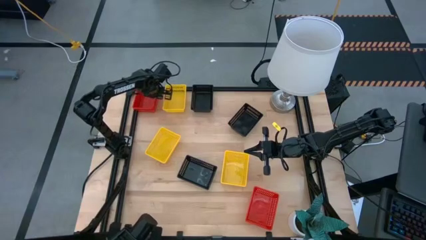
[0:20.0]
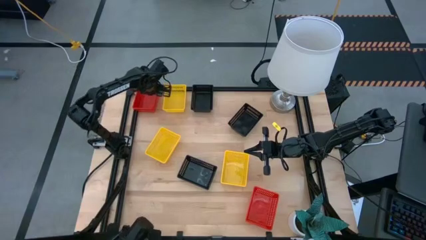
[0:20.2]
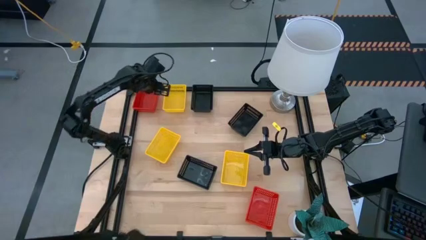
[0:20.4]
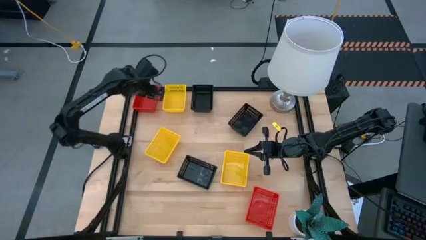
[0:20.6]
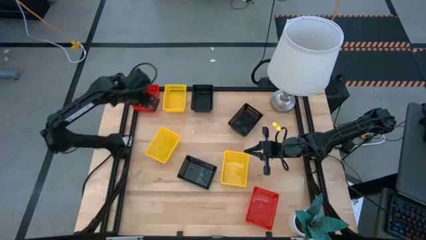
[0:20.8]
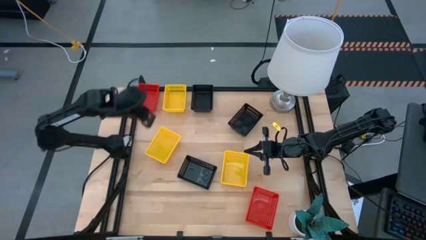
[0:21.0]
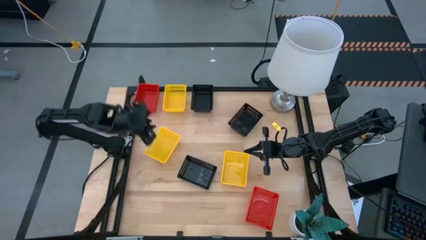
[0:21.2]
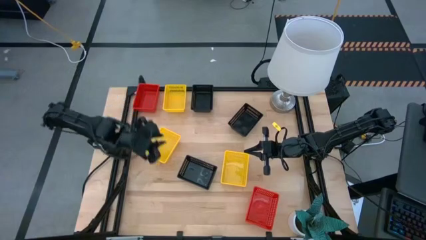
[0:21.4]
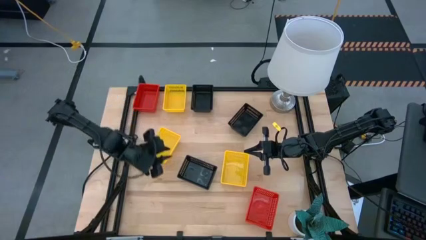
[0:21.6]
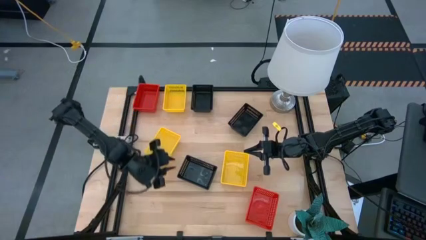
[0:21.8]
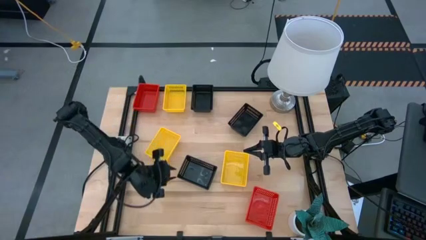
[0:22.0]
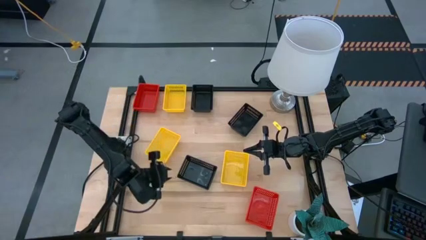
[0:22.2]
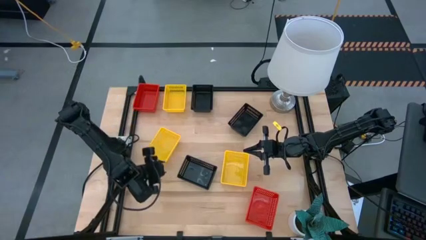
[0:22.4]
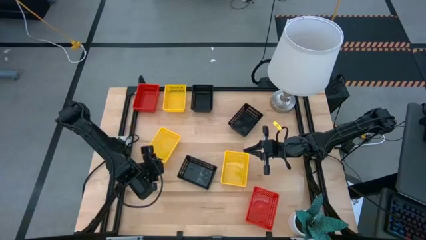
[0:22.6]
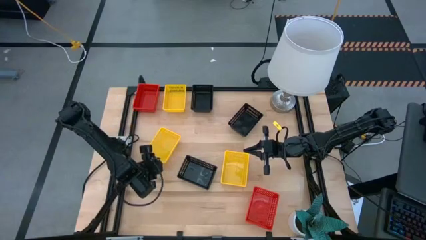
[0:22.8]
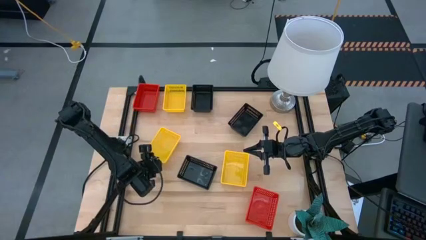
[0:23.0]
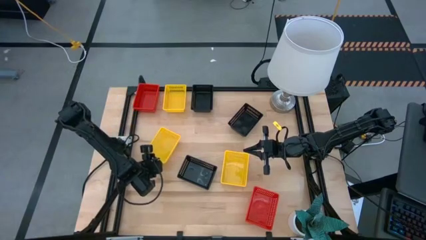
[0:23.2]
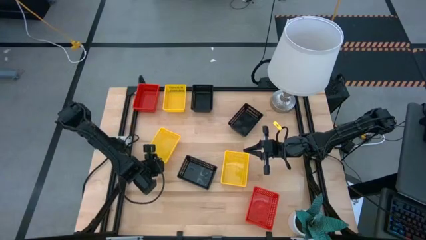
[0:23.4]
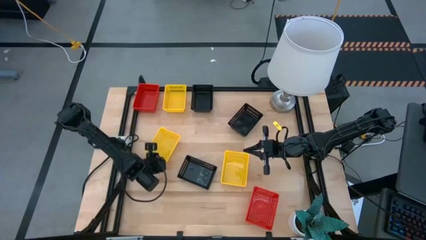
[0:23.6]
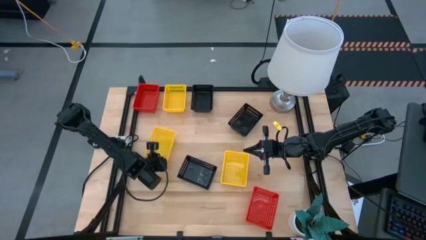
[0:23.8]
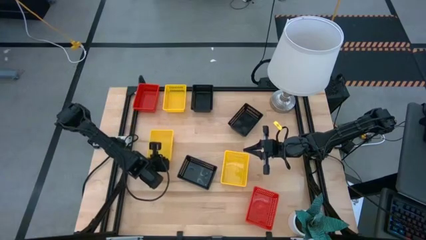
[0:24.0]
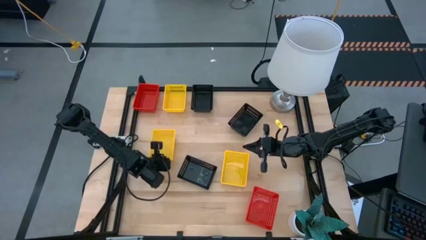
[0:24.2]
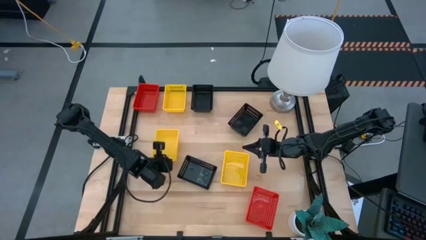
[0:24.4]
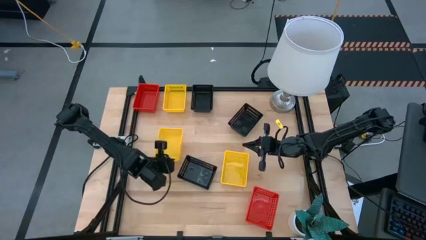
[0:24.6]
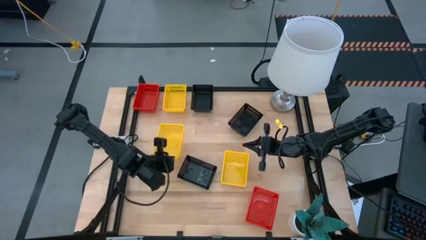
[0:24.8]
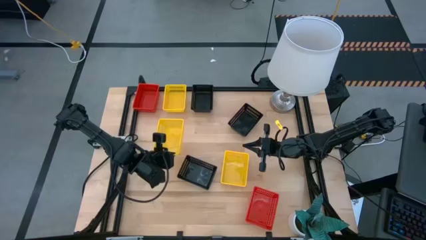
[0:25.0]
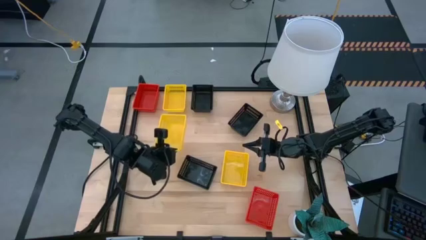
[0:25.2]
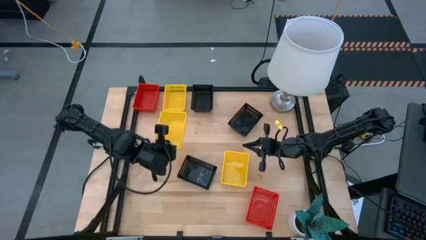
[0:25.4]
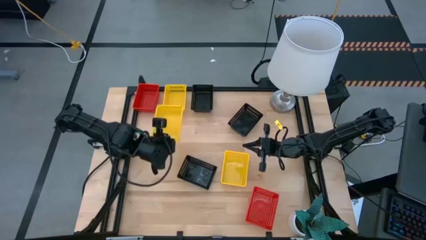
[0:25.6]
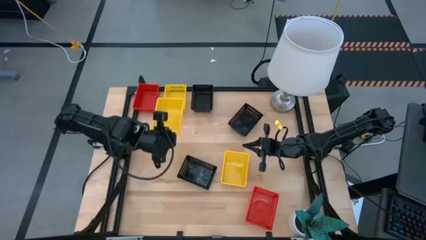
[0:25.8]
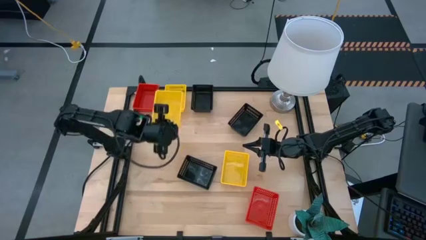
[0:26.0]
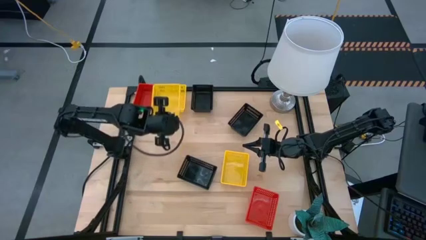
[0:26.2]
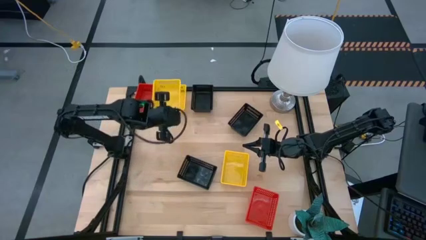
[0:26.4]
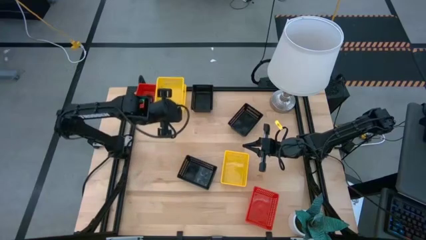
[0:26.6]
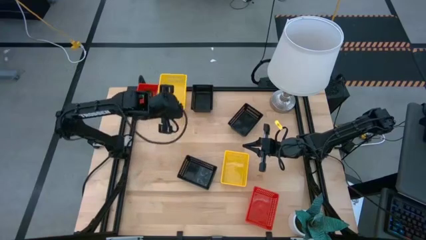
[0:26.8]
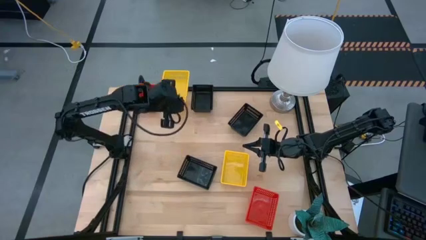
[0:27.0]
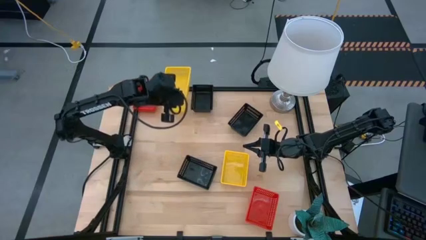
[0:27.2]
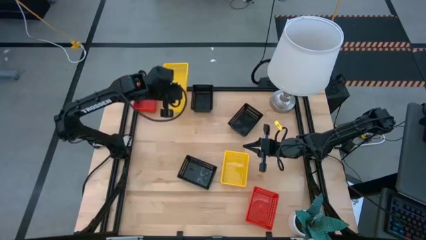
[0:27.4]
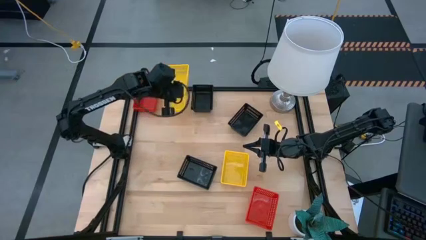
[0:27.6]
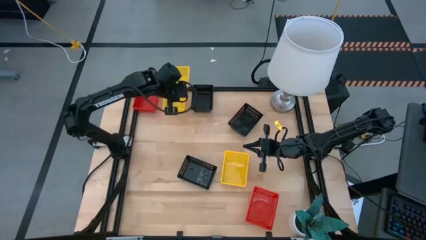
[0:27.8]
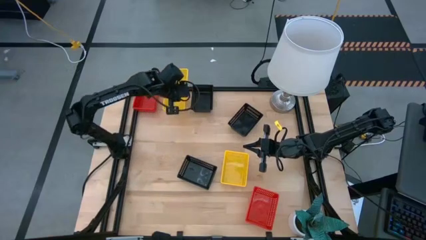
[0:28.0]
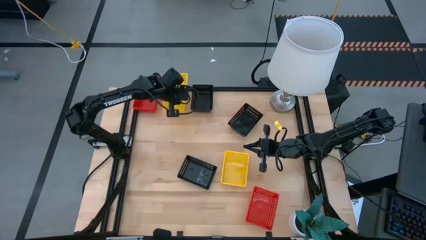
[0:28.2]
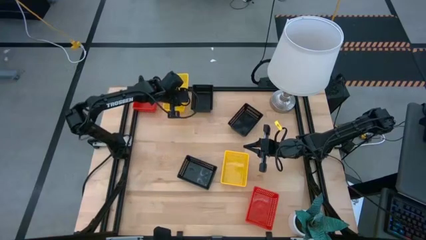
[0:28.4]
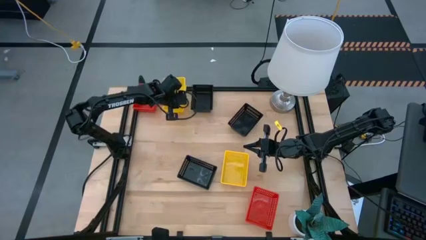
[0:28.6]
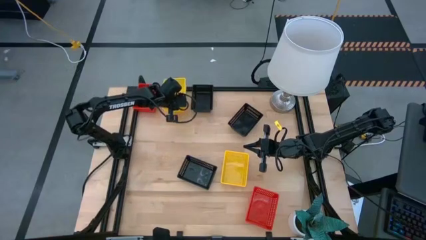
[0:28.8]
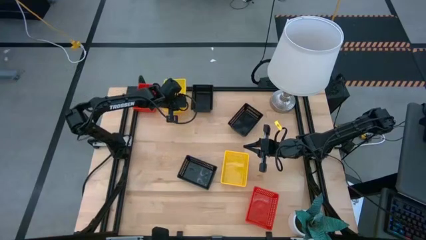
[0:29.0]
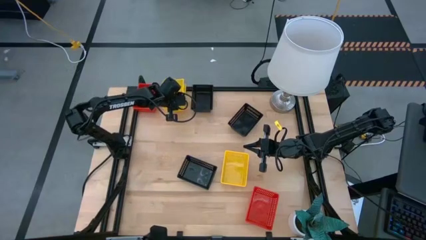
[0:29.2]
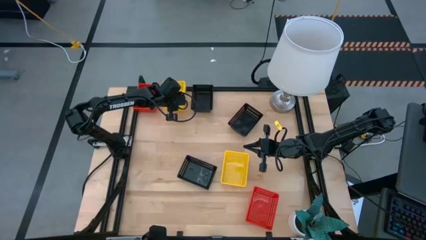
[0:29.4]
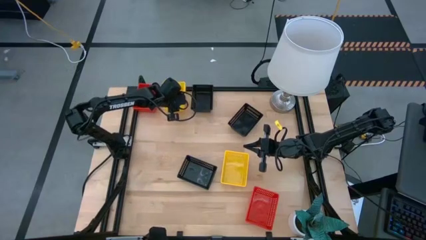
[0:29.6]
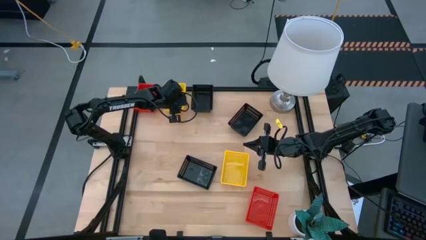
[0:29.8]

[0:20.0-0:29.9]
Stack the bottom left yellow bin on top of the top yellow bin

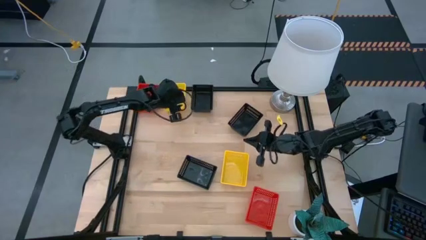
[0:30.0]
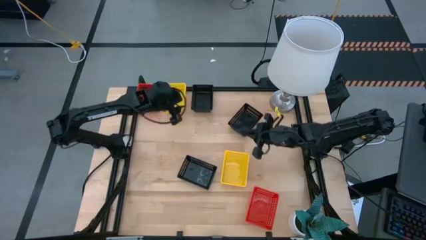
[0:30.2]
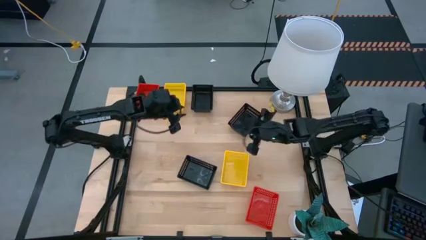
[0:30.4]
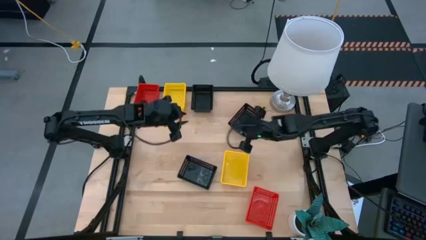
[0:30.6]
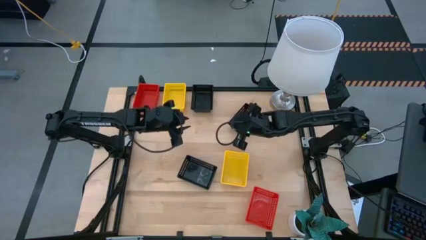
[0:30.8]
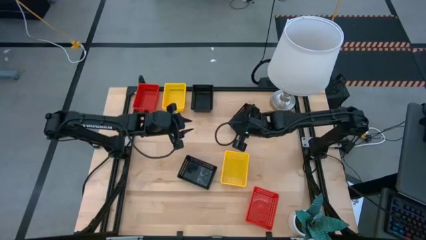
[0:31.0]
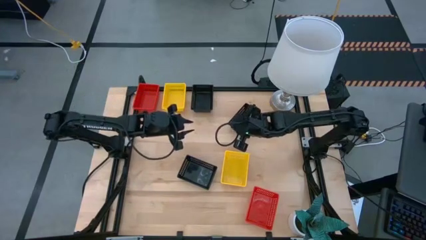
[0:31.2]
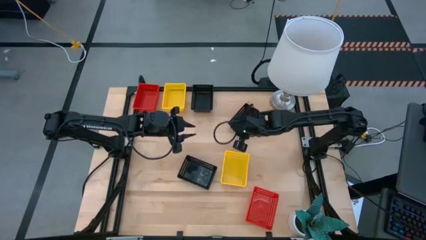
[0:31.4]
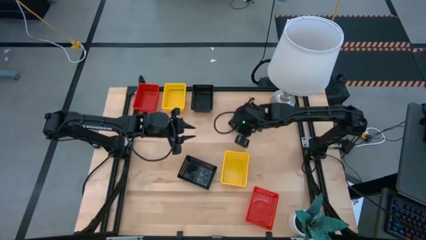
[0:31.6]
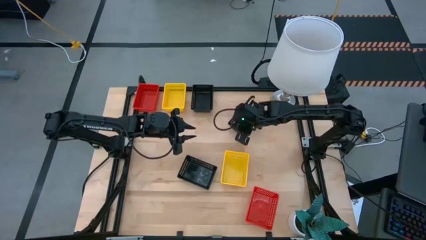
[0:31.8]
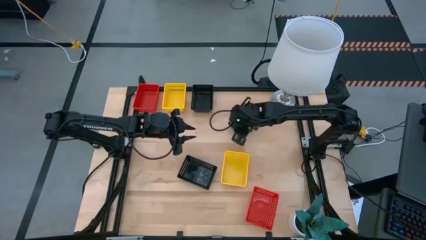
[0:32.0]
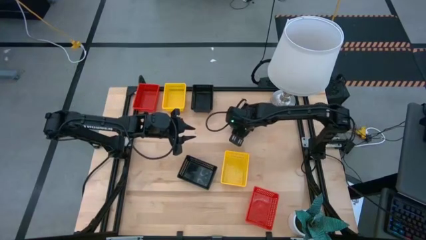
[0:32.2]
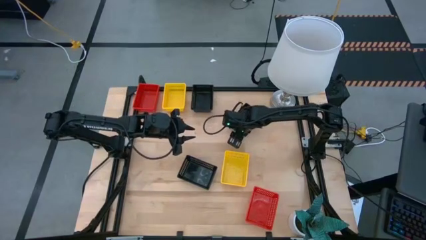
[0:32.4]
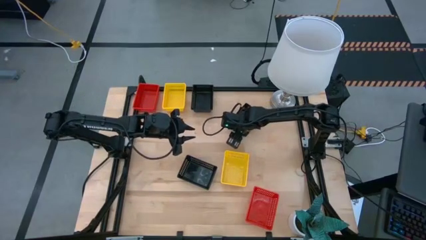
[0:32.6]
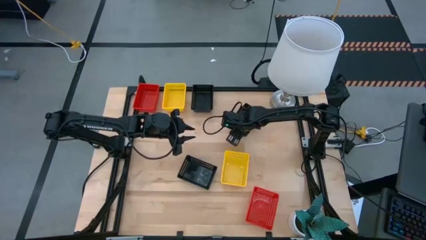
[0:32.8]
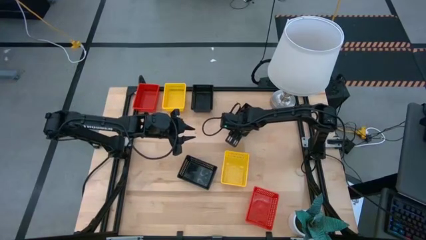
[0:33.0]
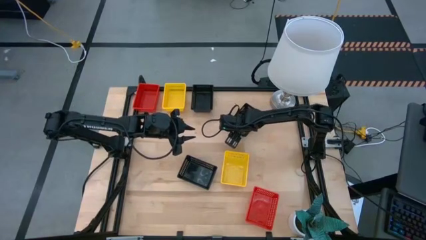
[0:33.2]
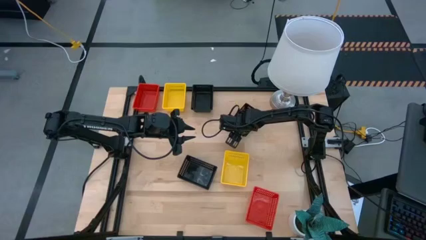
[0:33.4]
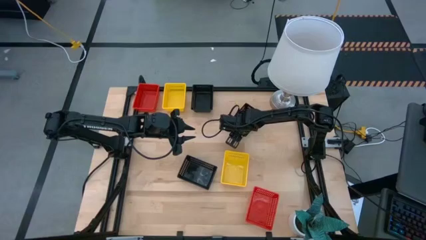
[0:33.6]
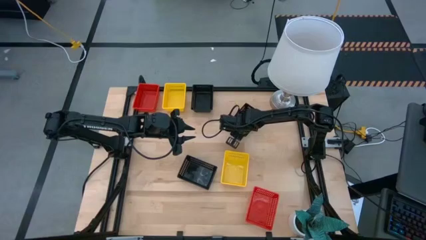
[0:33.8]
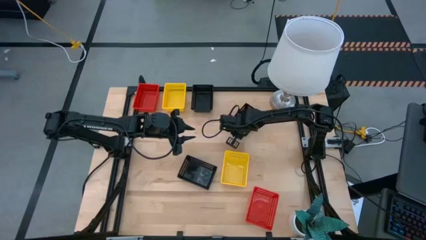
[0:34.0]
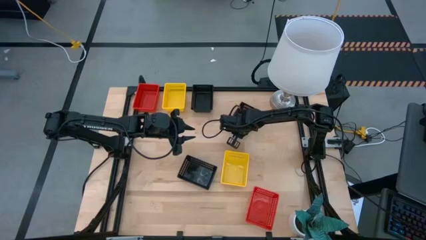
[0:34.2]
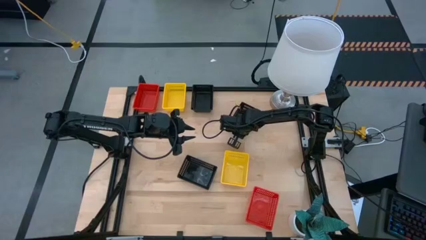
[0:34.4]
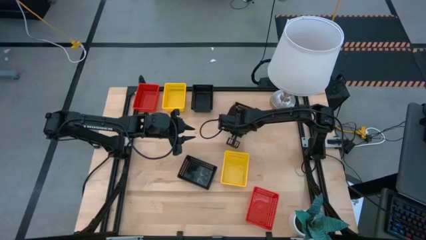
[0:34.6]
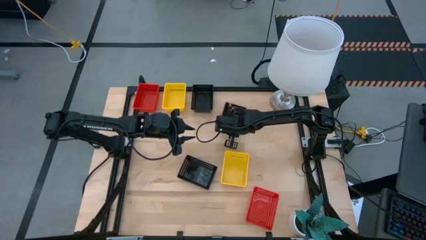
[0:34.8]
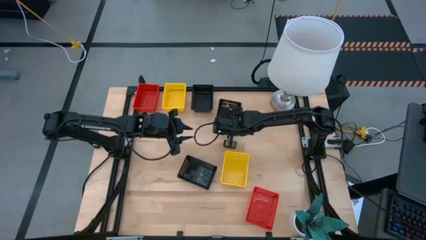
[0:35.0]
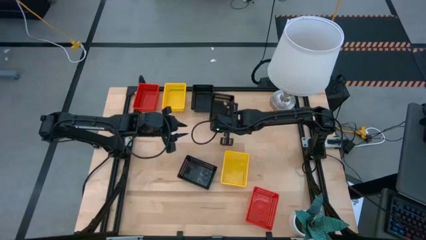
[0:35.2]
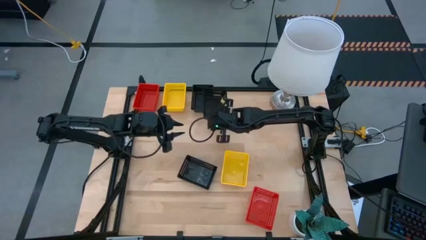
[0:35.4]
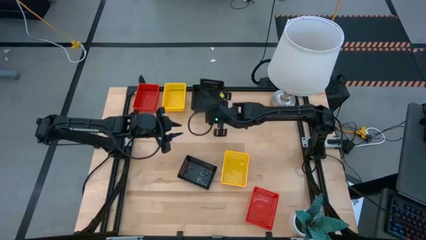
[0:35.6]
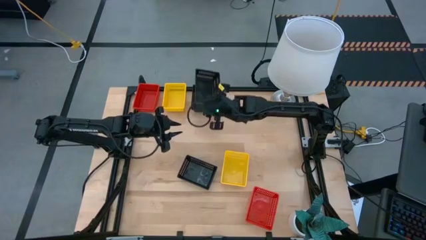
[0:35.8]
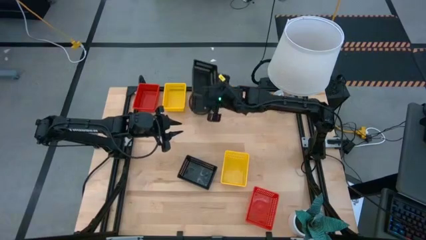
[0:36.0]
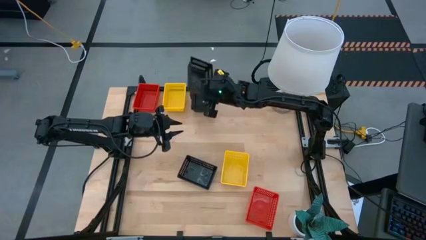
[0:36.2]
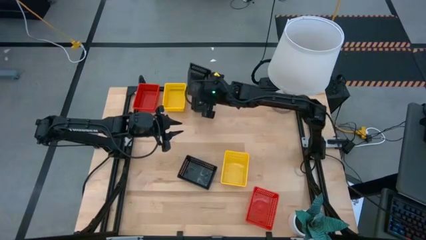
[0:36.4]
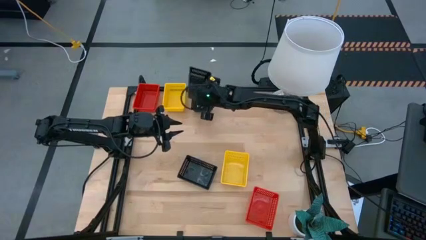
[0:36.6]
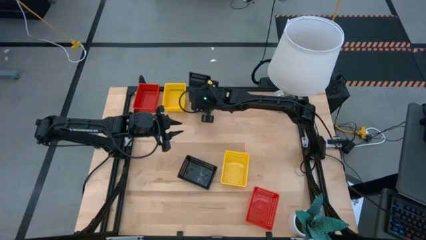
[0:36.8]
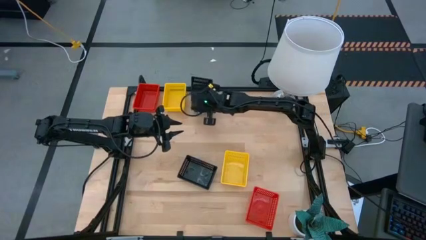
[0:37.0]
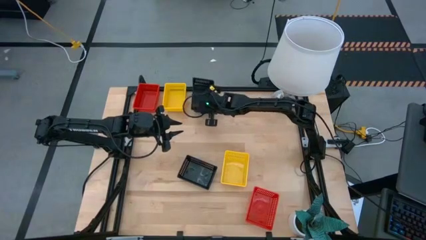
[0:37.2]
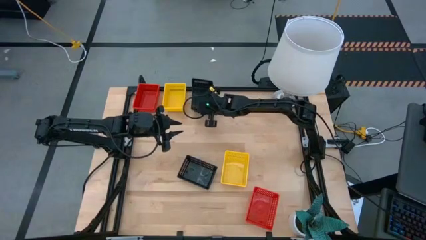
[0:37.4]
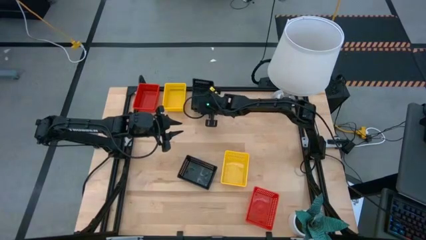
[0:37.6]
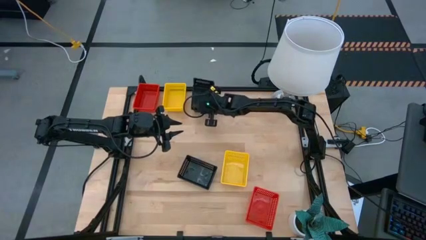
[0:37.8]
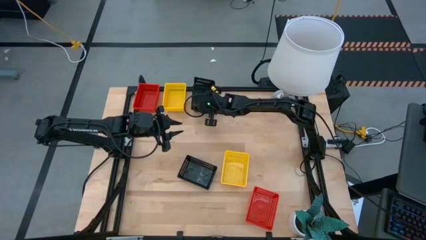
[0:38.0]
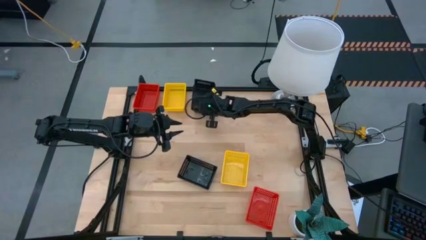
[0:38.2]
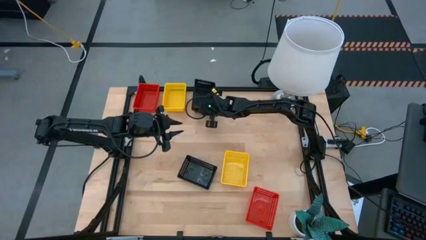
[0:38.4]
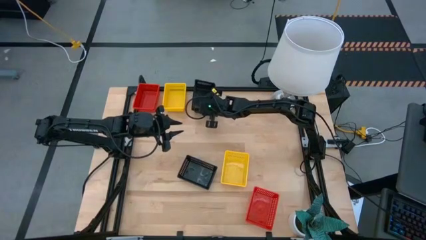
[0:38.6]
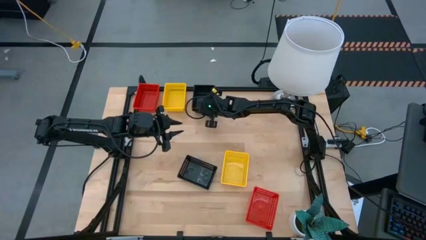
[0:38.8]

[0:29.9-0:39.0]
Stack the top right black bin on top of the top left black bin
